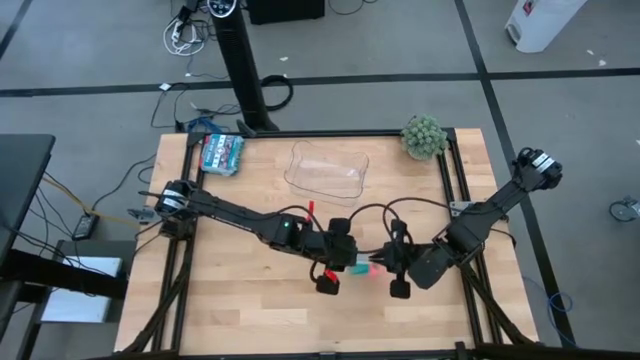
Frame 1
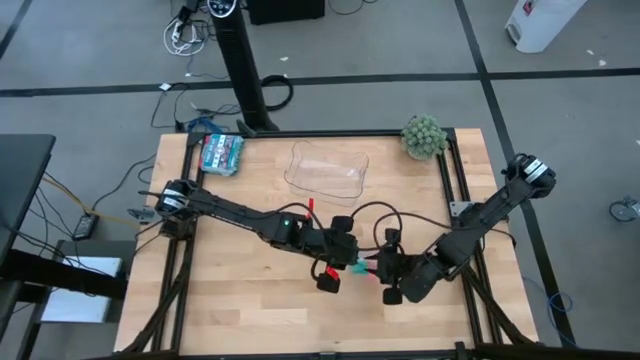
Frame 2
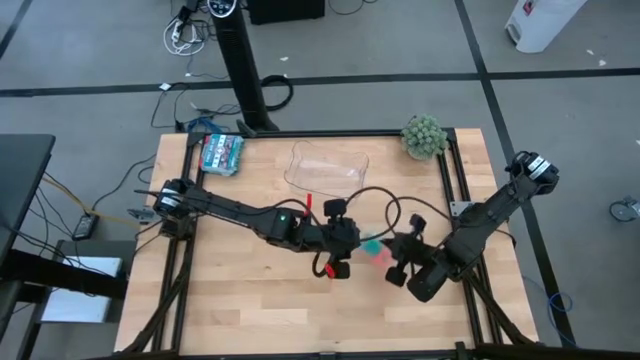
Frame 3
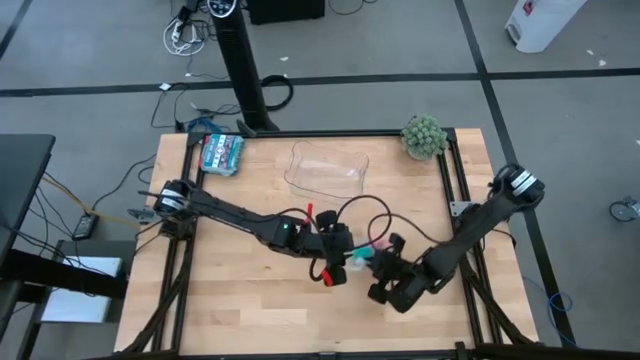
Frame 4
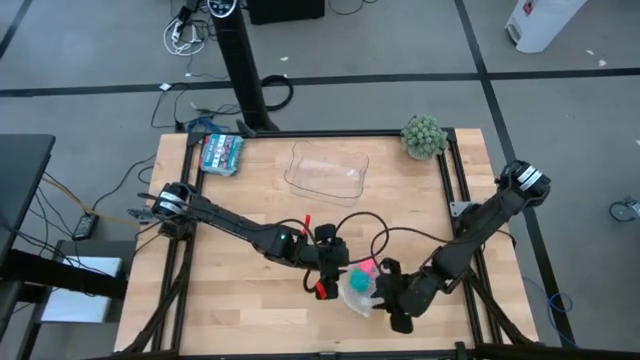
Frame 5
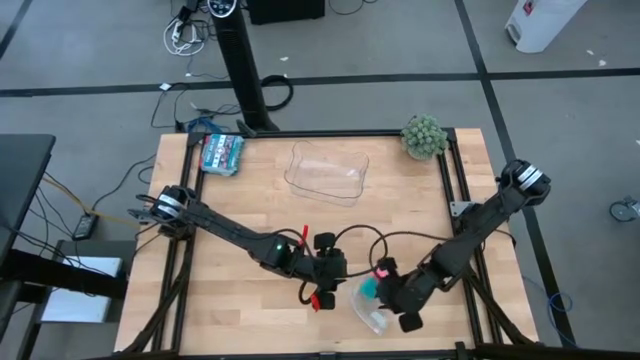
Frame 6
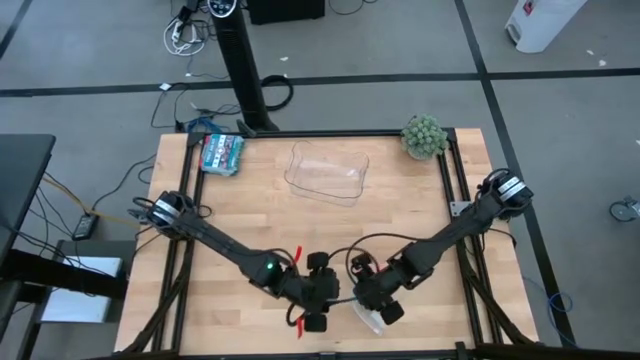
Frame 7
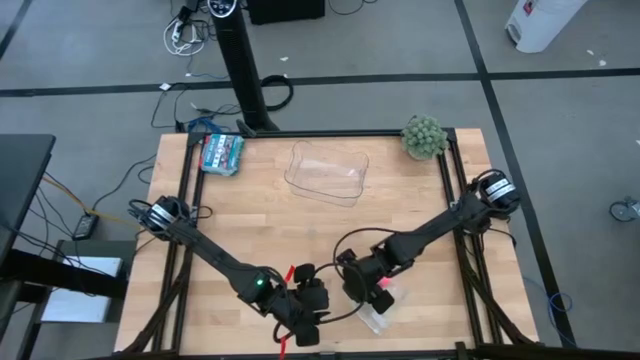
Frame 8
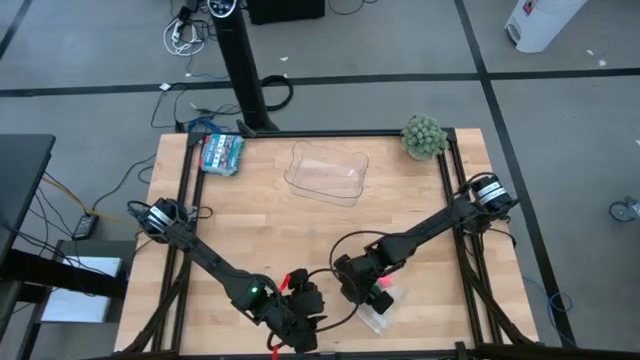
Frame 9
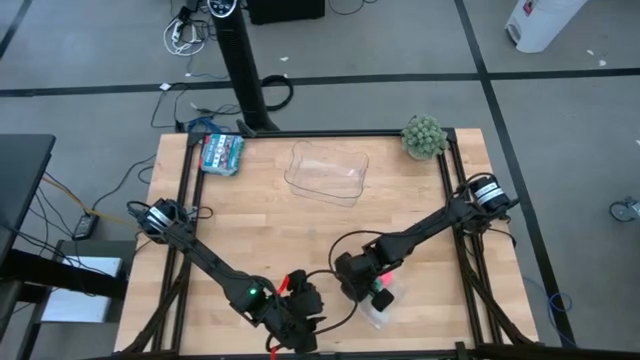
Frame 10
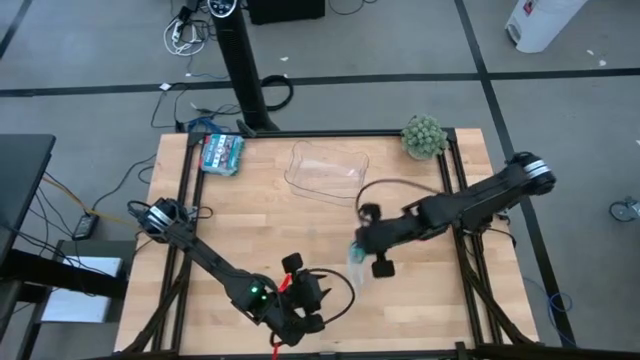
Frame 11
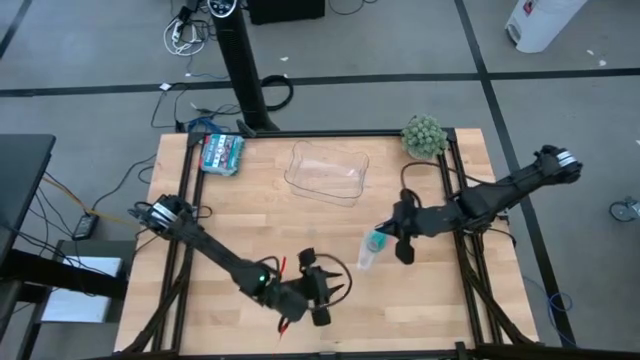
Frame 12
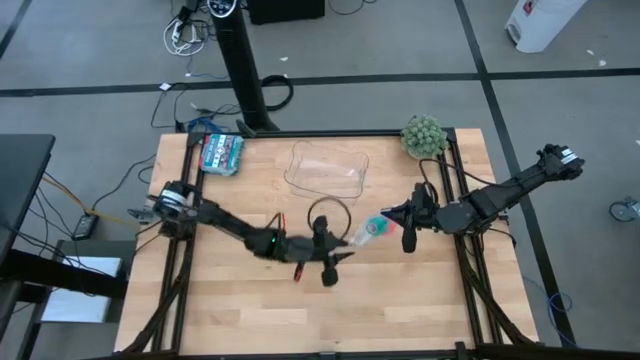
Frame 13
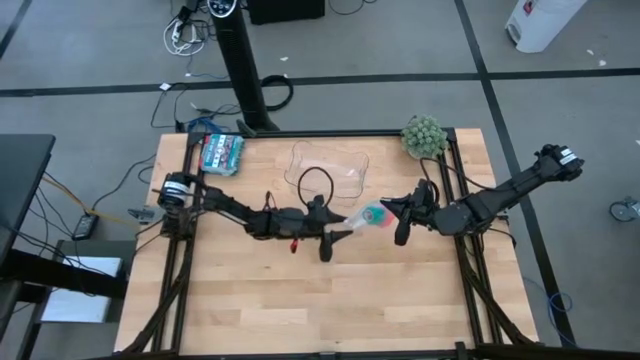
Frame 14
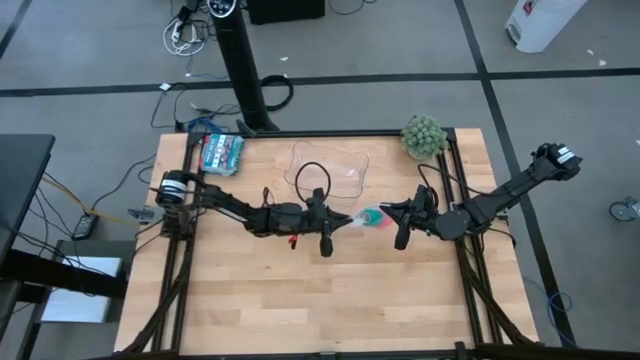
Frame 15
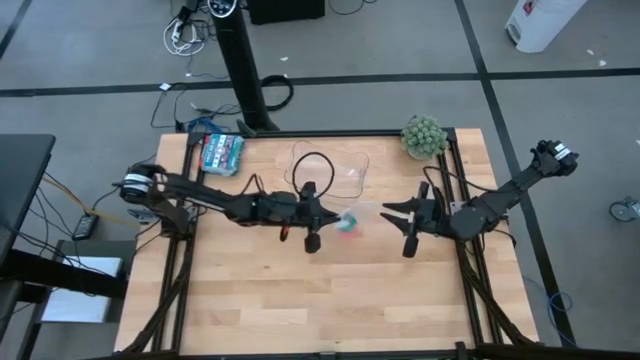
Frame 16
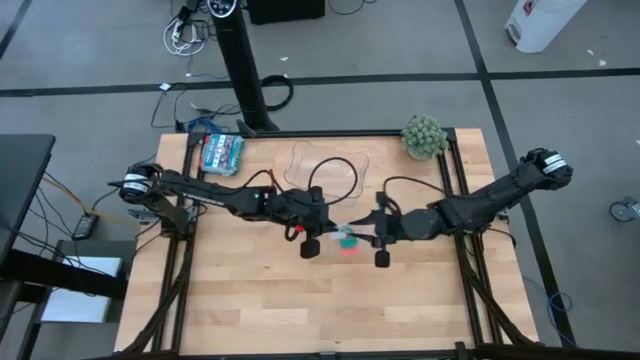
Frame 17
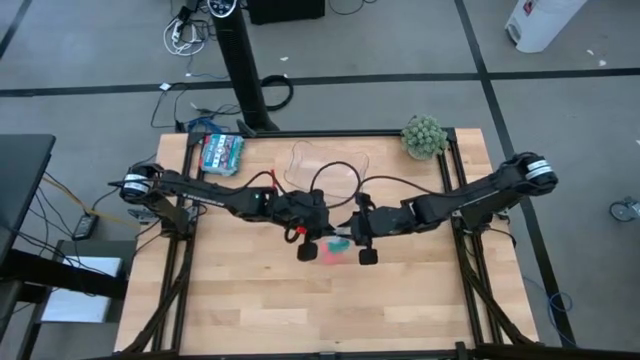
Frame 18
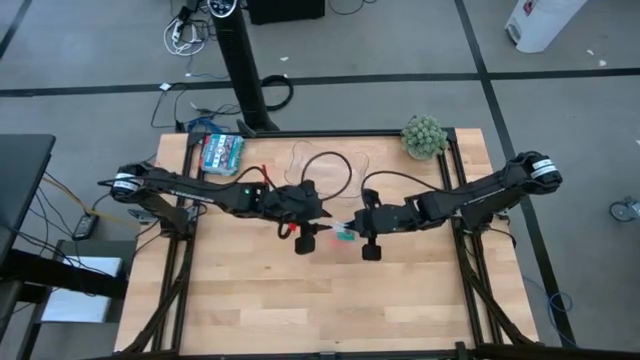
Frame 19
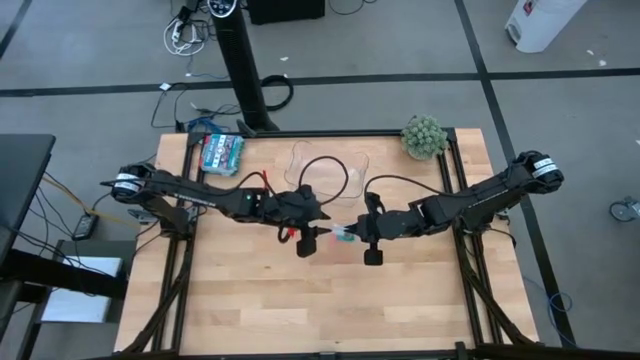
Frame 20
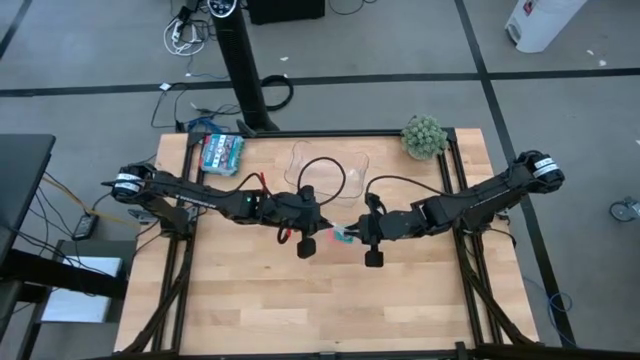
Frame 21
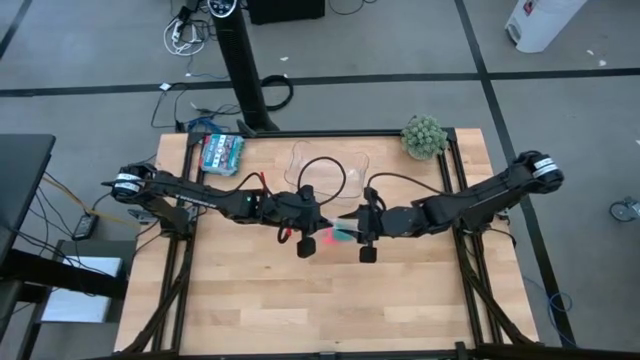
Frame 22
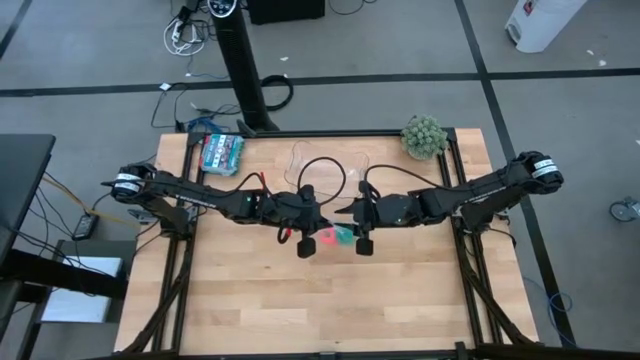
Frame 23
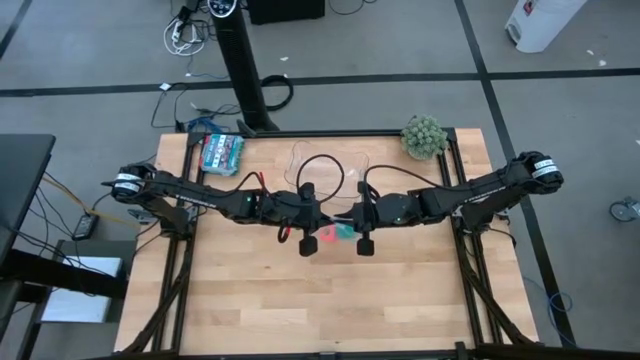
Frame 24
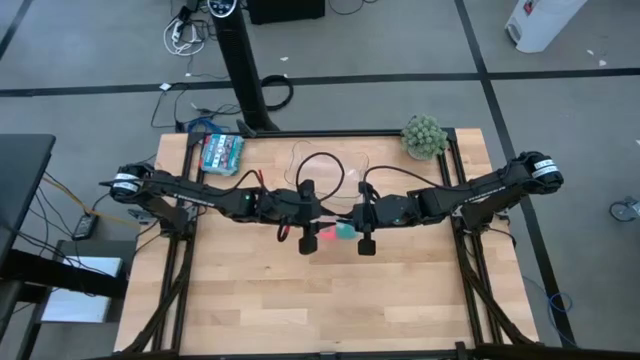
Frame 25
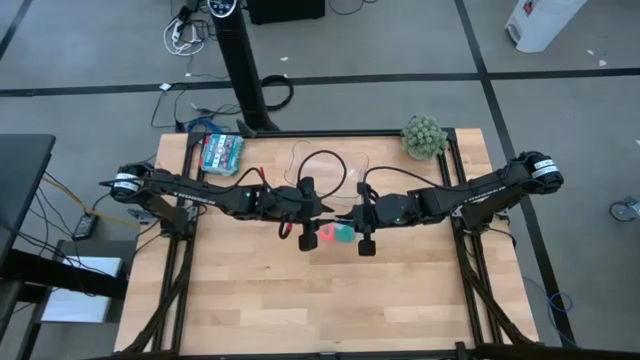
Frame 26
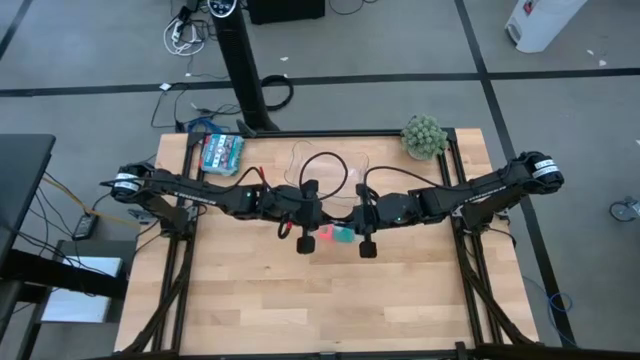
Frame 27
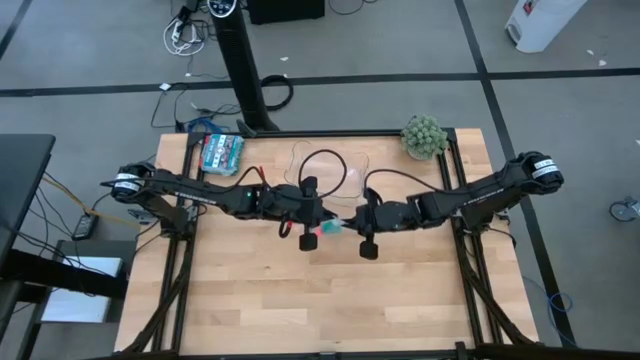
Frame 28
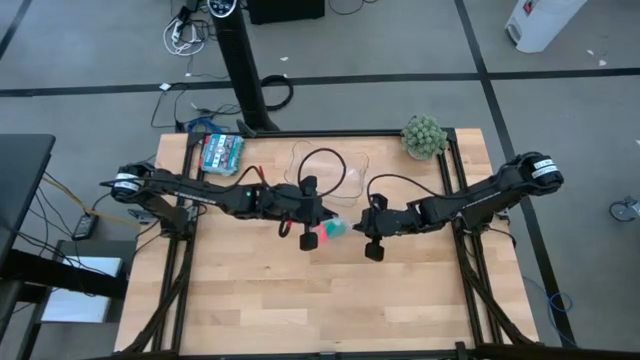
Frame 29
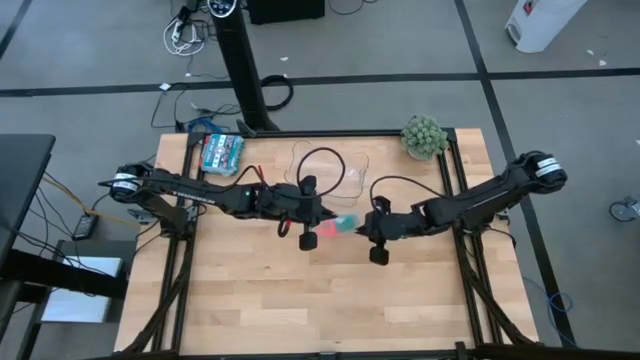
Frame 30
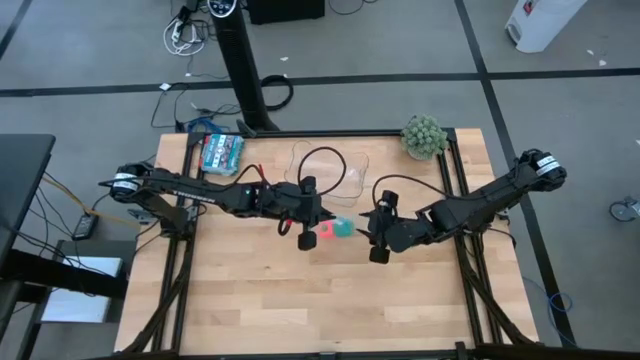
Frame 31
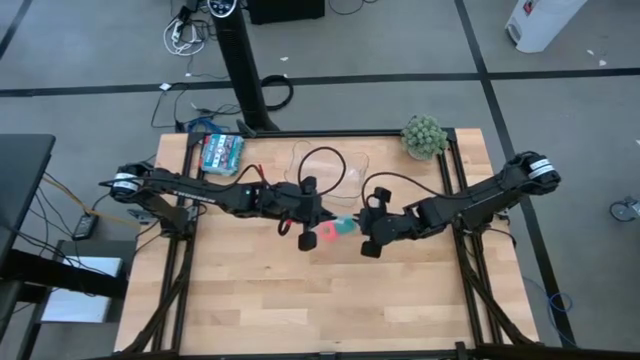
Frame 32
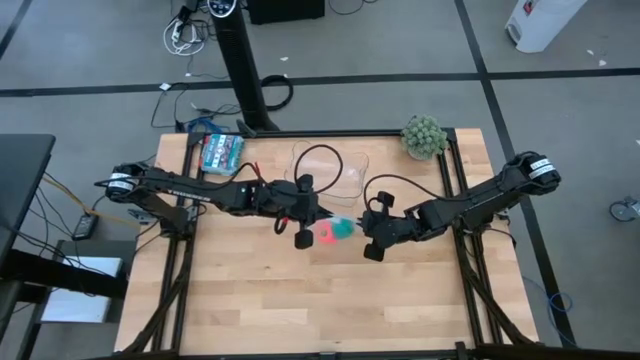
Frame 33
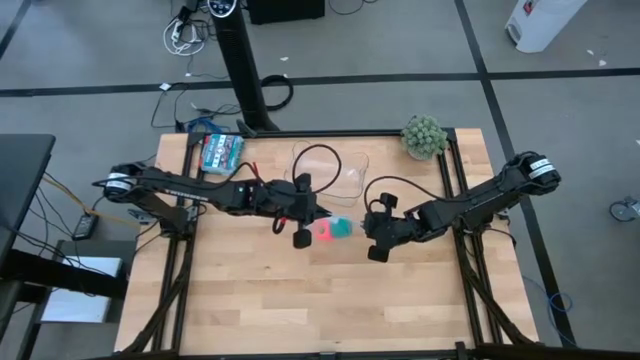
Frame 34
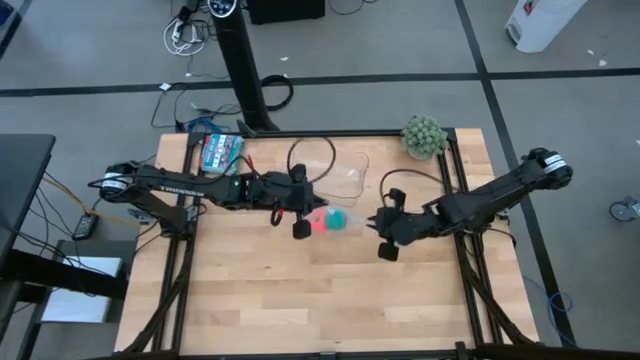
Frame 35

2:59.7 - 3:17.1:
Task: Roll bandage
Close the transparent zip bag

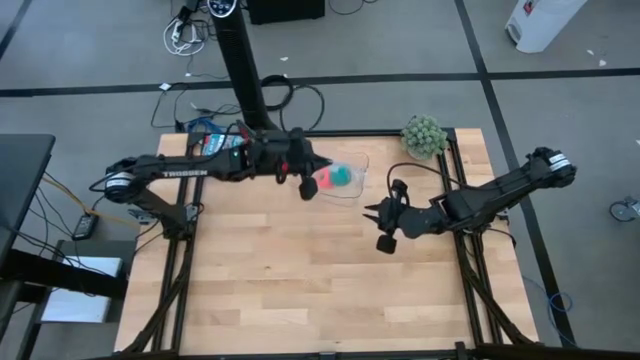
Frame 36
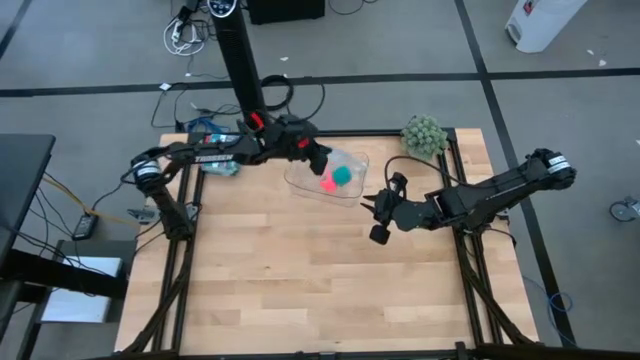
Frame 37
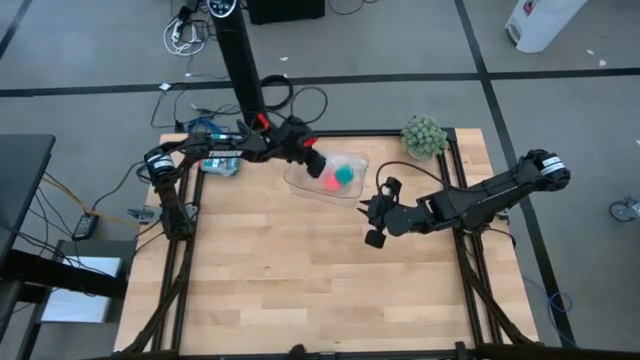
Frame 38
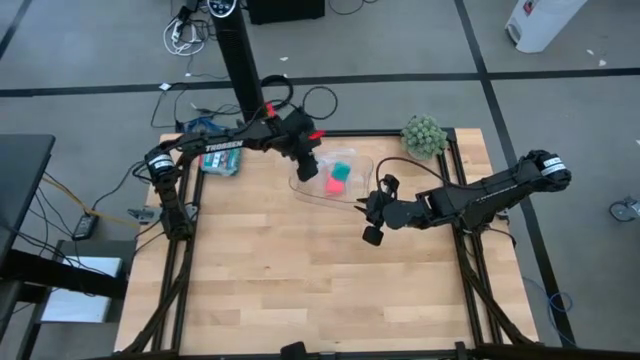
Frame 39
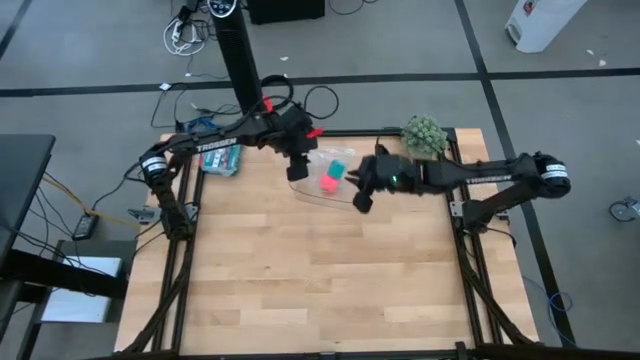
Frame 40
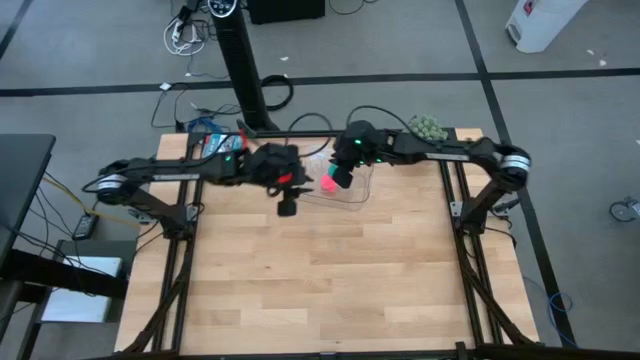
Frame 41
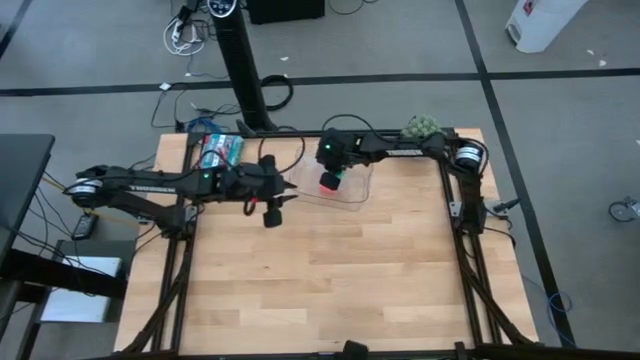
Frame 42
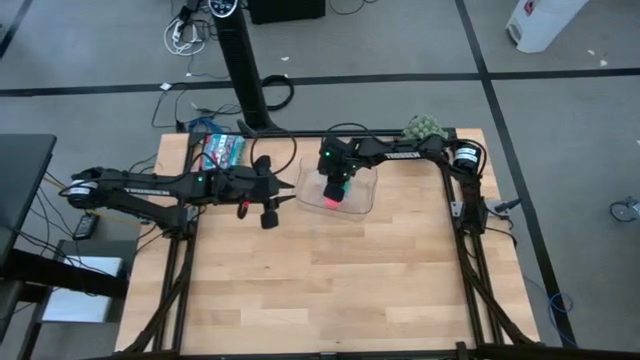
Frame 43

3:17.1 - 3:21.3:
Put the transparent zip bag into the transparent bin
